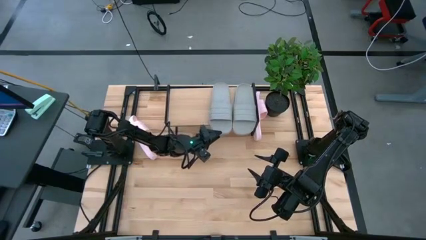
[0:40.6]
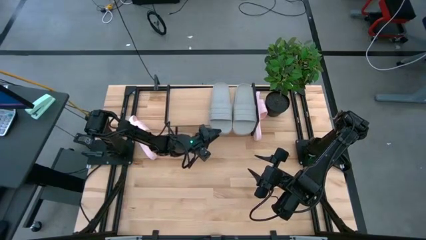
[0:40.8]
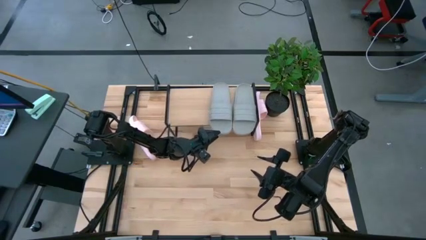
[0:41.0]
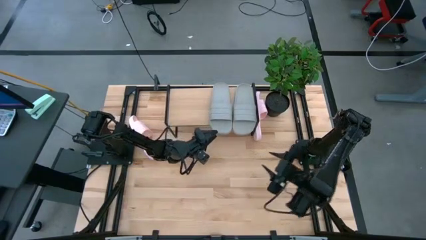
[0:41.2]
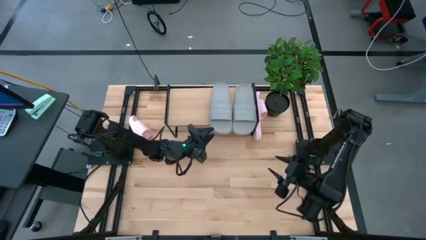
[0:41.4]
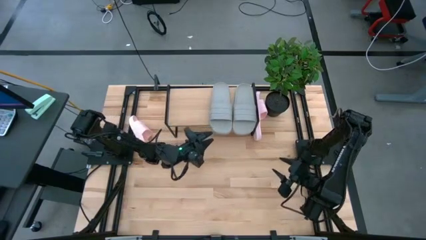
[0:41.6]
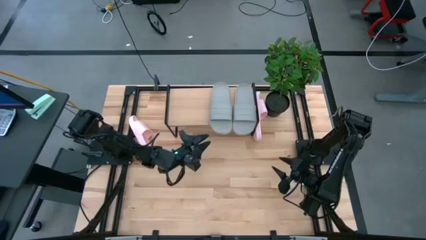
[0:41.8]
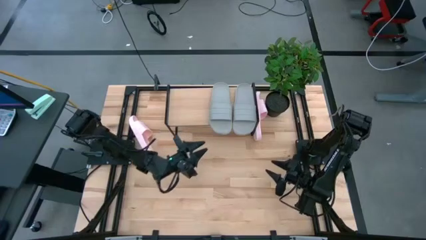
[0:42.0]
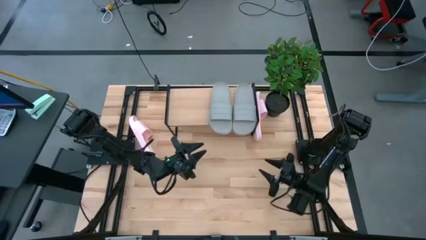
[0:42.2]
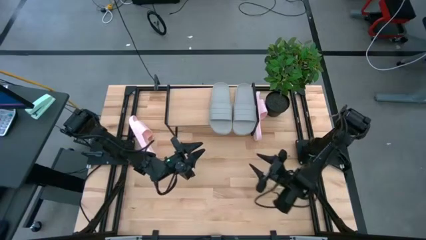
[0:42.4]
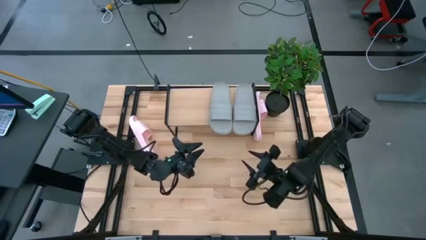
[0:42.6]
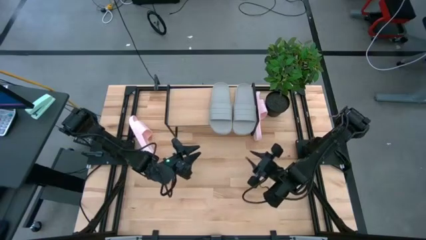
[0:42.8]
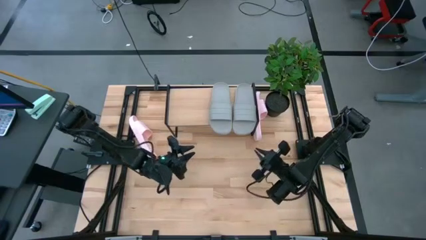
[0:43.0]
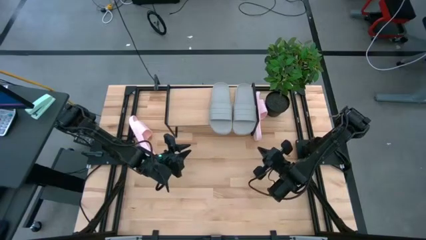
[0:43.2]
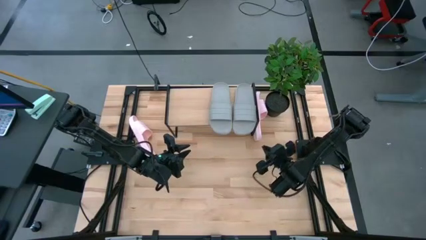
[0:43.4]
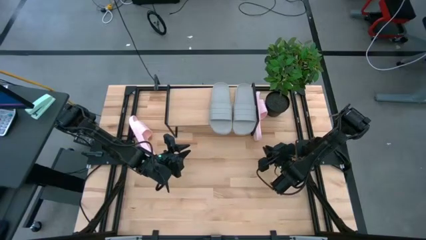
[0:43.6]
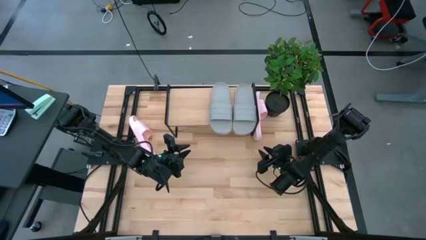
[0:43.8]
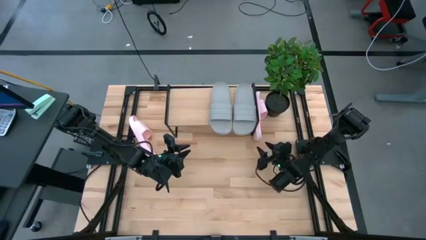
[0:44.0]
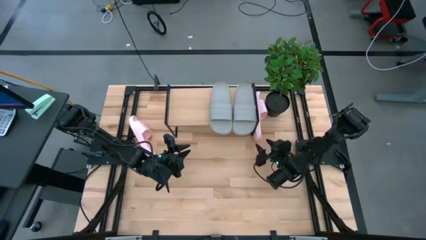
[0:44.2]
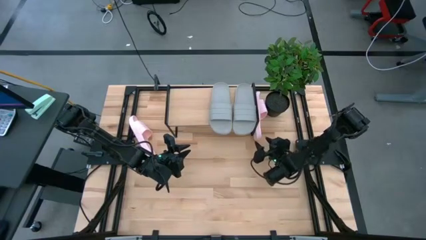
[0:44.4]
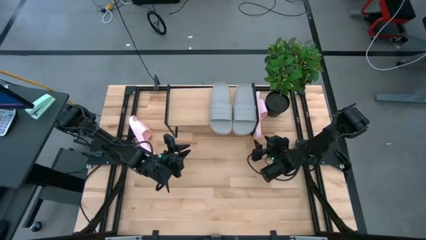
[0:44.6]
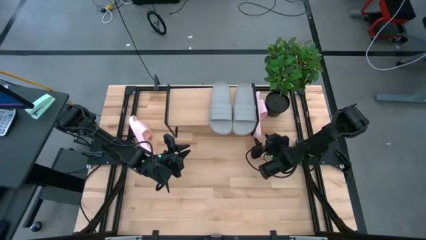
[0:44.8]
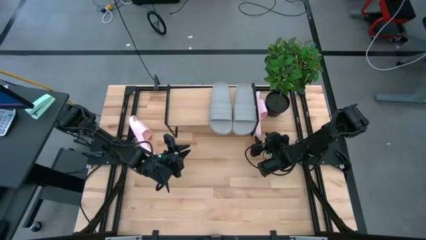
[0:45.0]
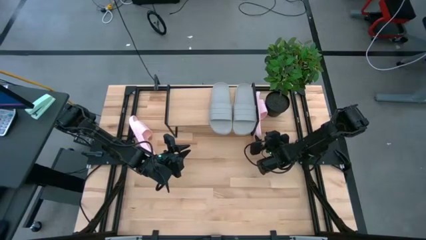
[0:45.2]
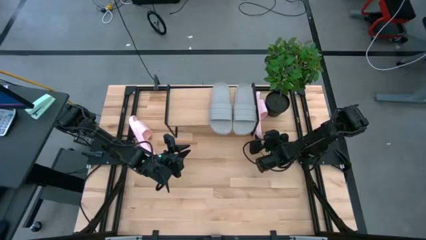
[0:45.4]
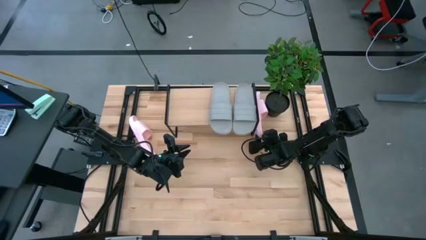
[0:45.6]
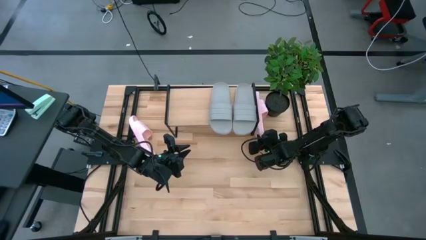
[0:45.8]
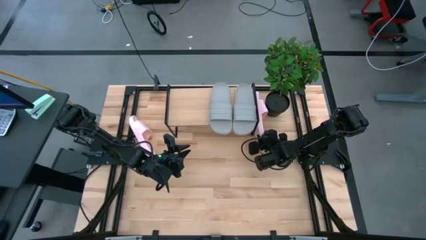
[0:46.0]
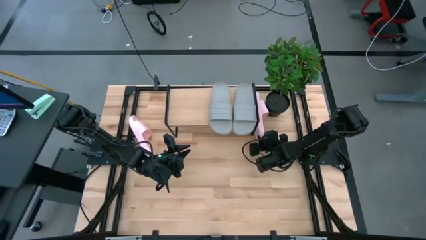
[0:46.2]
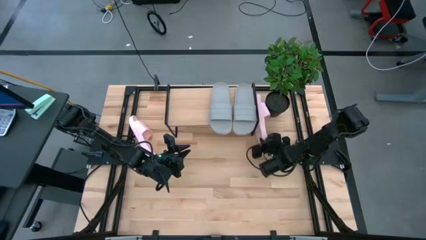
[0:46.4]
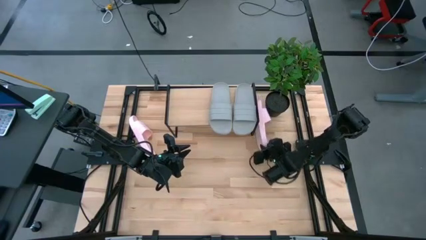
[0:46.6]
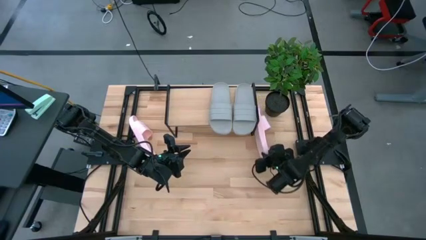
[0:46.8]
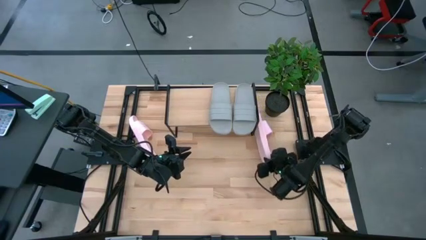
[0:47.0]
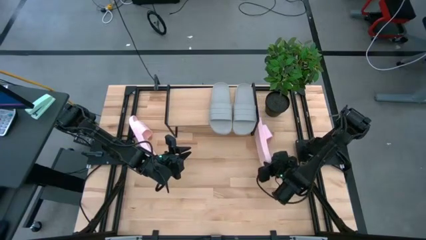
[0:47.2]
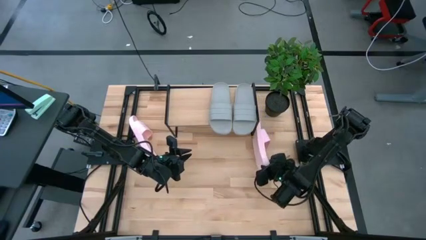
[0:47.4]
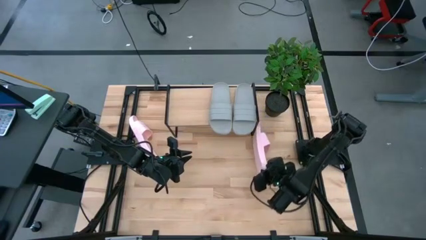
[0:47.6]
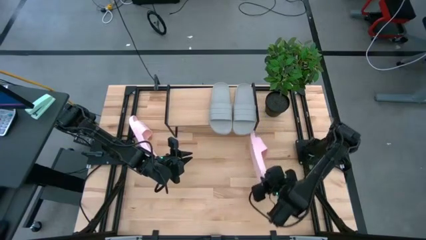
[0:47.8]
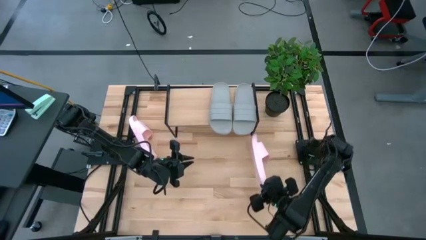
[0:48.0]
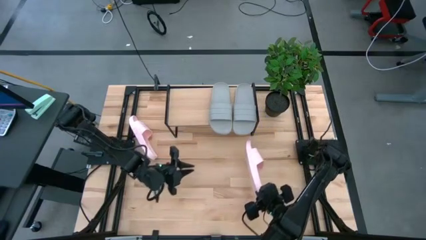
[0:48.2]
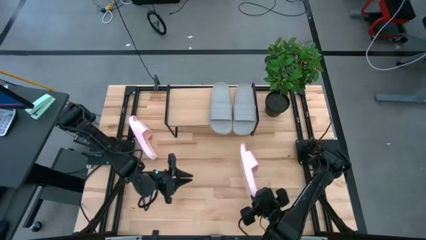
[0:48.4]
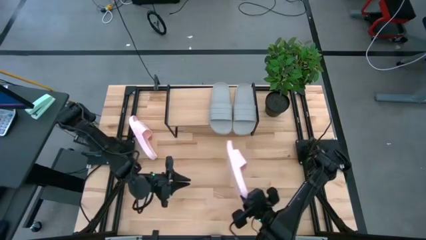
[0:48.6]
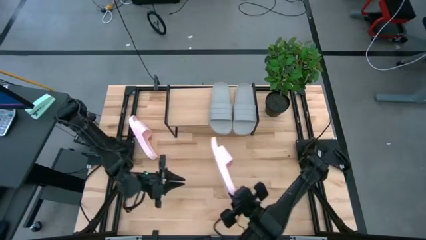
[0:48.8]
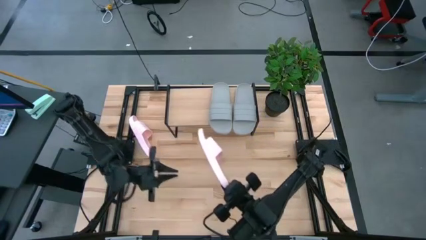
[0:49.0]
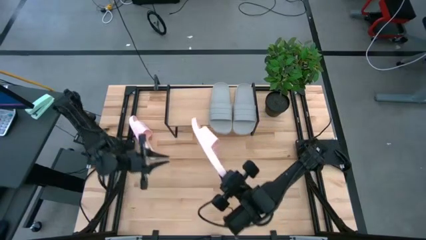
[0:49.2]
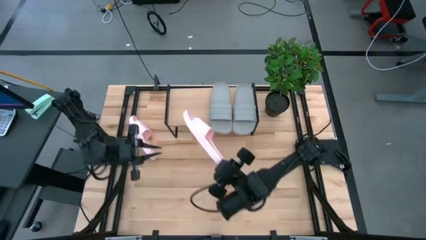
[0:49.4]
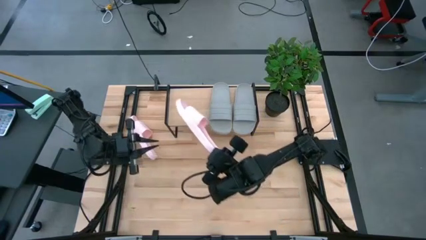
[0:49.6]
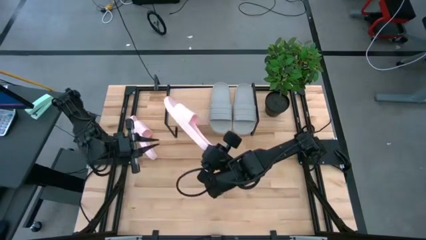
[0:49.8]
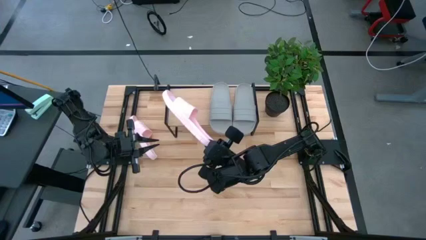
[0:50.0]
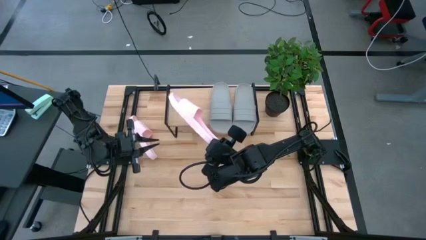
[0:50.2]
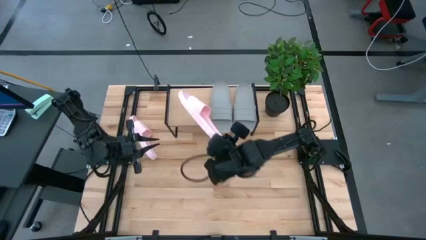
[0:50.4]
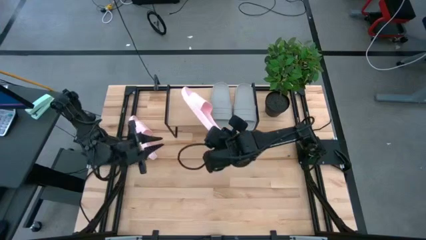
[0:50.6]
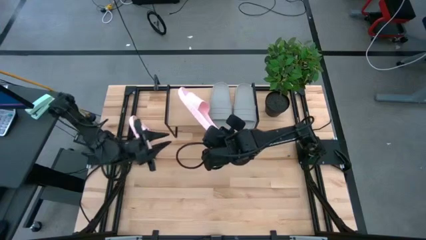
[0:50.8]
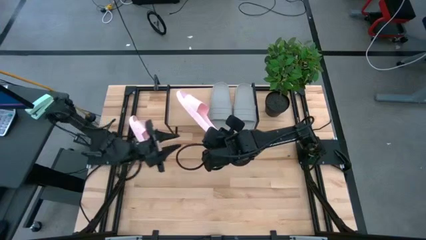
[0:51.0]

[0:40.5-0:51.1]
Task: Pick and place slides into the shelf
Put the right pink slide onto the shelf
